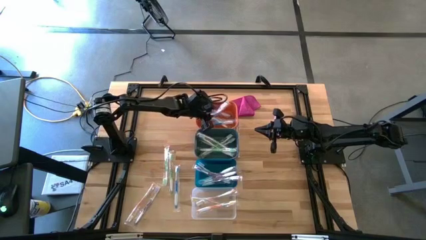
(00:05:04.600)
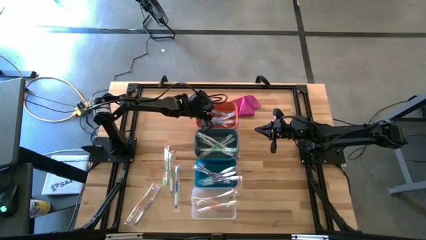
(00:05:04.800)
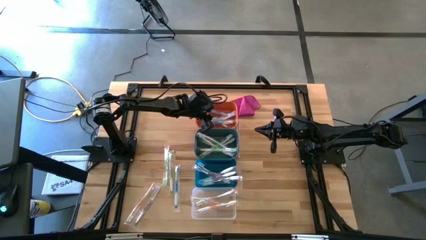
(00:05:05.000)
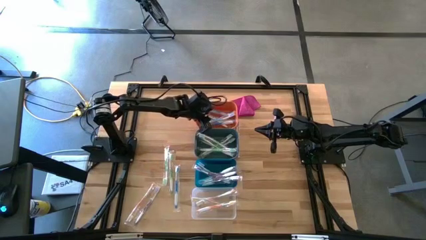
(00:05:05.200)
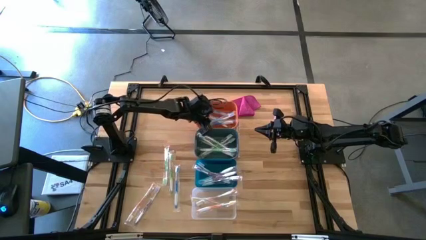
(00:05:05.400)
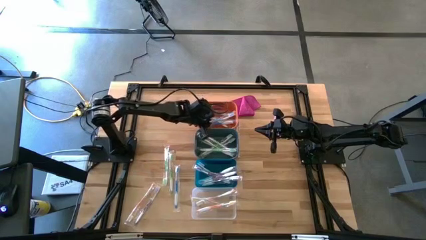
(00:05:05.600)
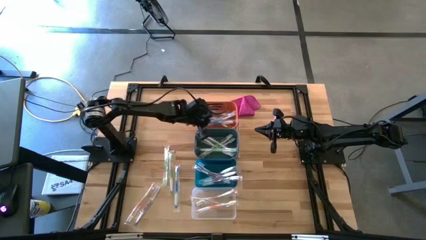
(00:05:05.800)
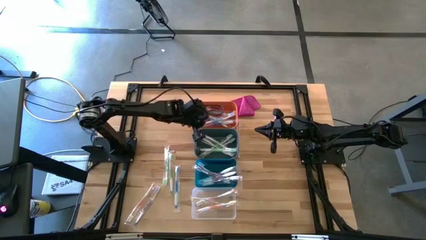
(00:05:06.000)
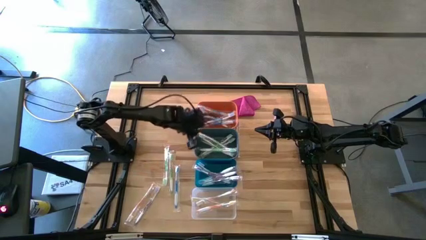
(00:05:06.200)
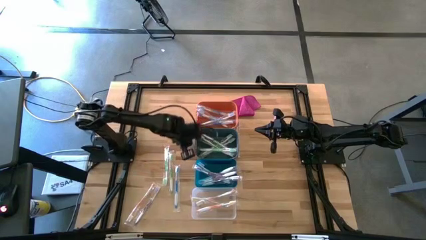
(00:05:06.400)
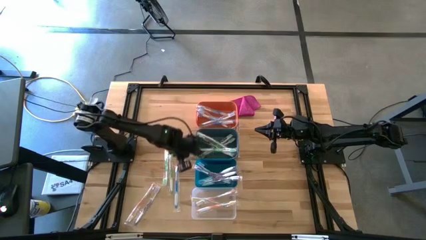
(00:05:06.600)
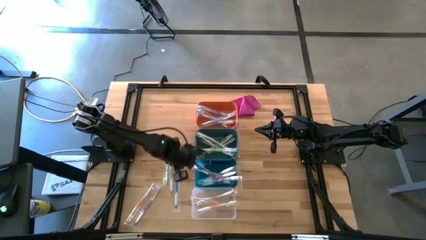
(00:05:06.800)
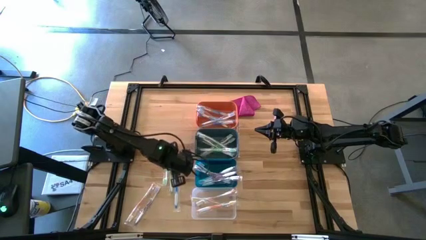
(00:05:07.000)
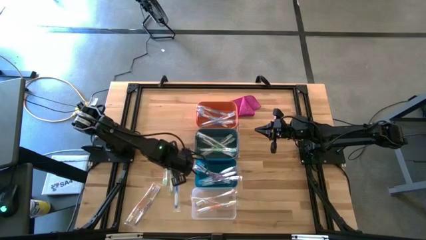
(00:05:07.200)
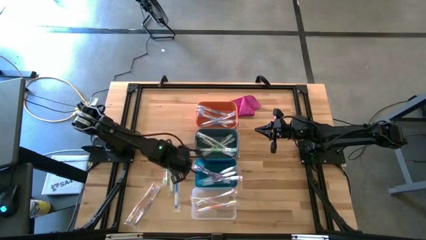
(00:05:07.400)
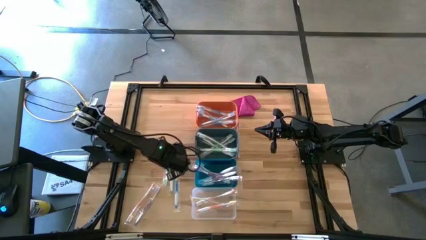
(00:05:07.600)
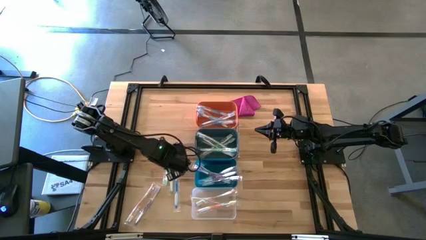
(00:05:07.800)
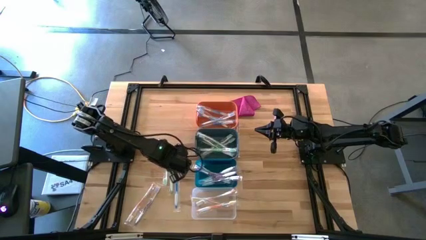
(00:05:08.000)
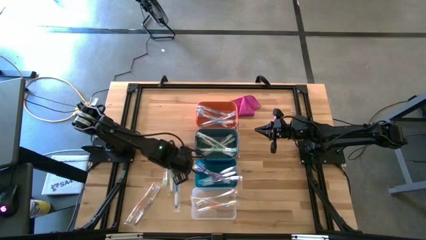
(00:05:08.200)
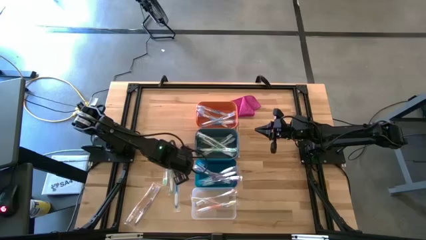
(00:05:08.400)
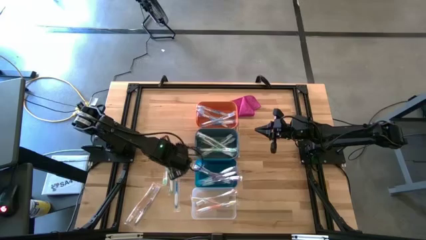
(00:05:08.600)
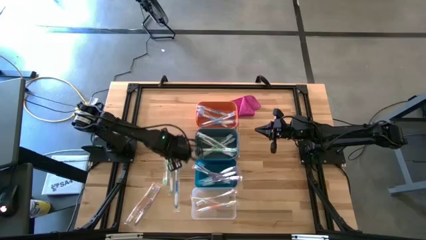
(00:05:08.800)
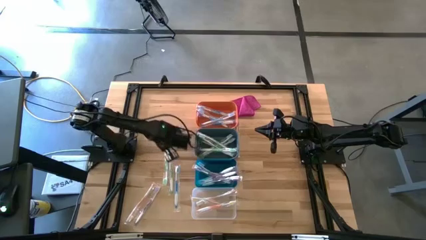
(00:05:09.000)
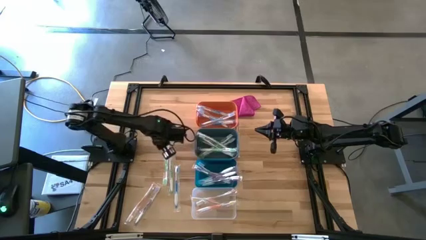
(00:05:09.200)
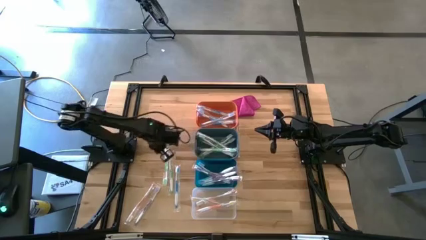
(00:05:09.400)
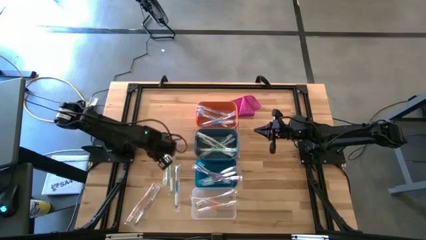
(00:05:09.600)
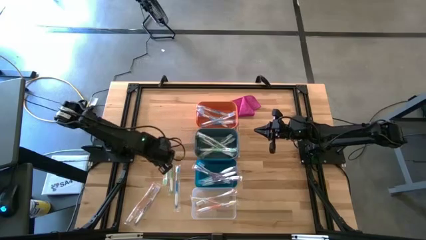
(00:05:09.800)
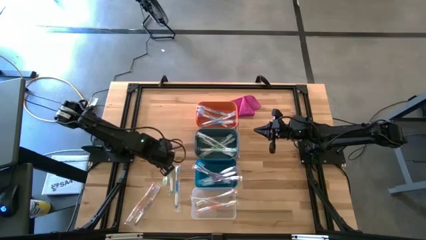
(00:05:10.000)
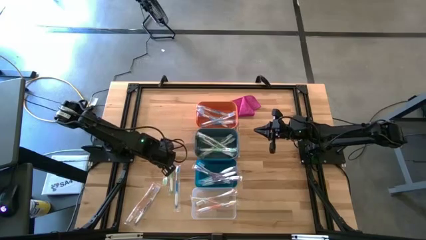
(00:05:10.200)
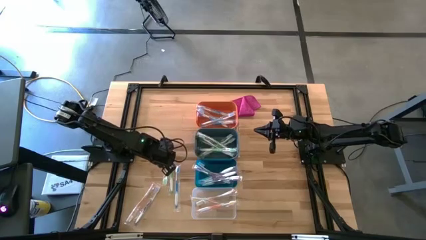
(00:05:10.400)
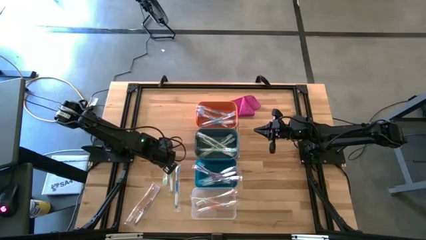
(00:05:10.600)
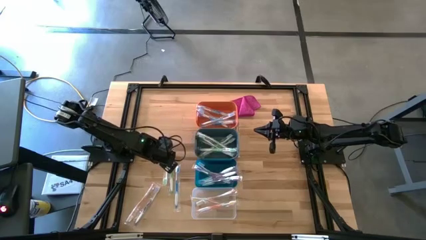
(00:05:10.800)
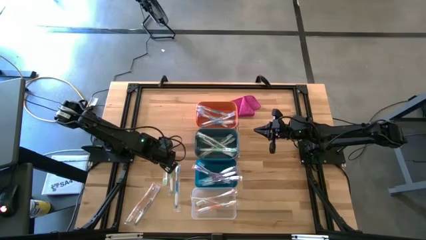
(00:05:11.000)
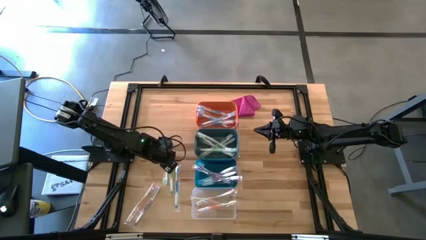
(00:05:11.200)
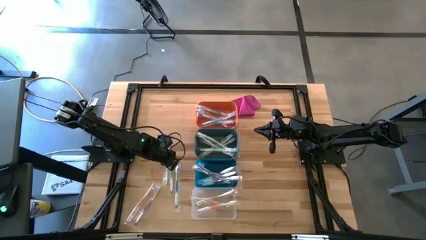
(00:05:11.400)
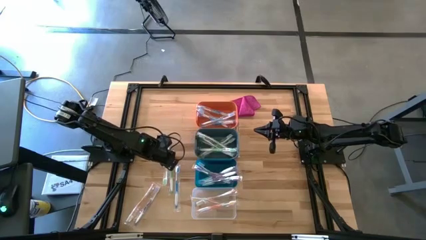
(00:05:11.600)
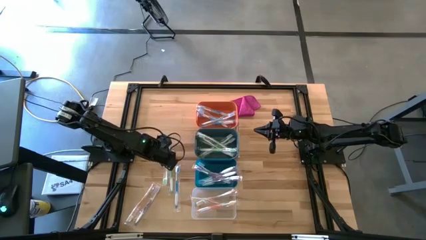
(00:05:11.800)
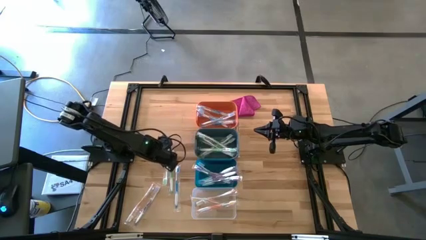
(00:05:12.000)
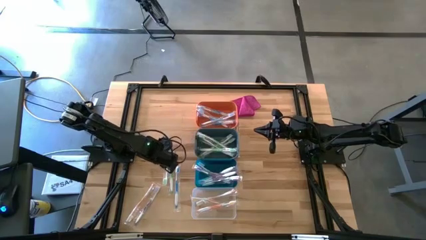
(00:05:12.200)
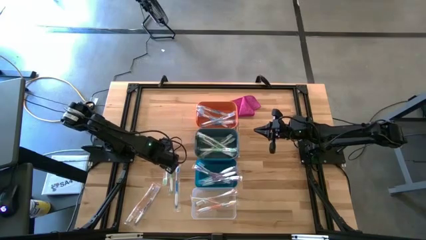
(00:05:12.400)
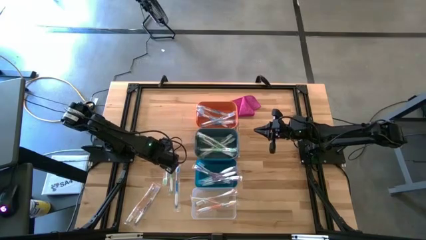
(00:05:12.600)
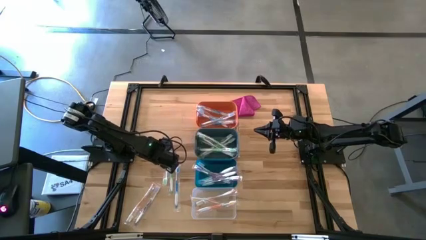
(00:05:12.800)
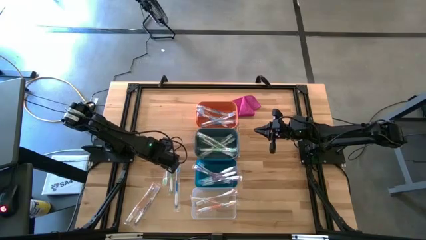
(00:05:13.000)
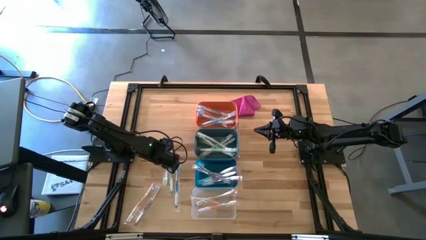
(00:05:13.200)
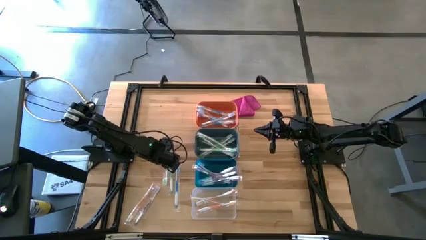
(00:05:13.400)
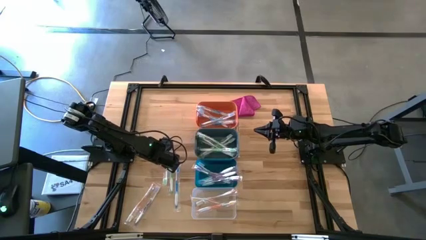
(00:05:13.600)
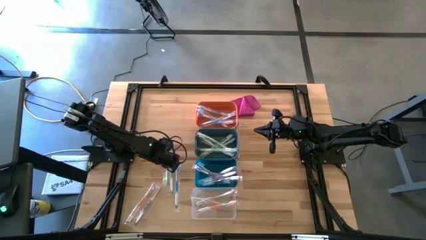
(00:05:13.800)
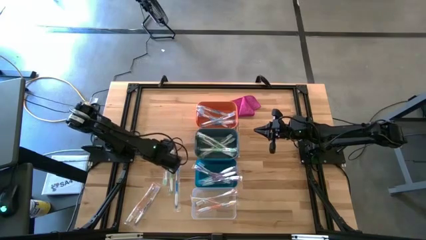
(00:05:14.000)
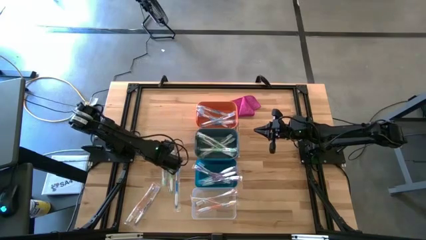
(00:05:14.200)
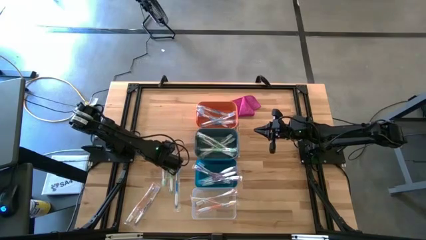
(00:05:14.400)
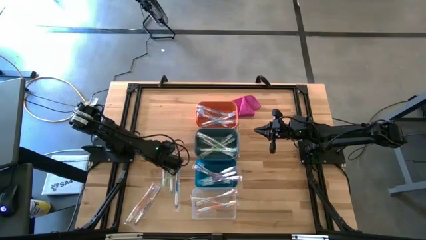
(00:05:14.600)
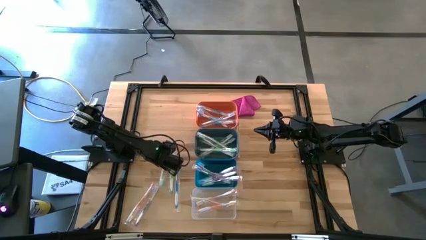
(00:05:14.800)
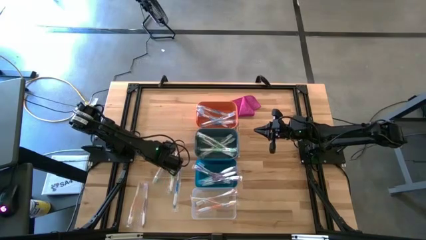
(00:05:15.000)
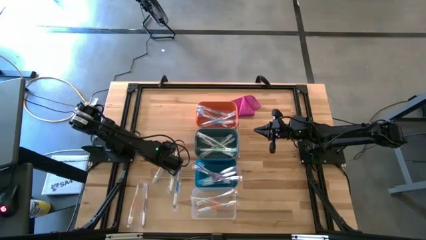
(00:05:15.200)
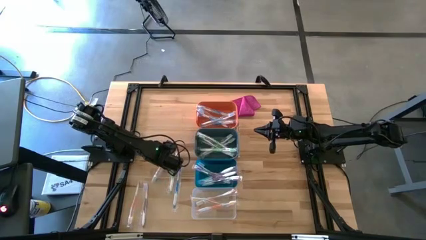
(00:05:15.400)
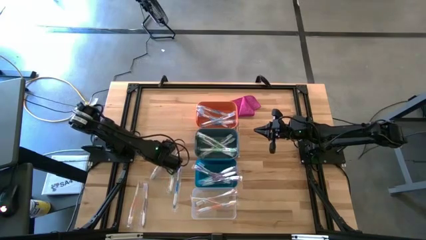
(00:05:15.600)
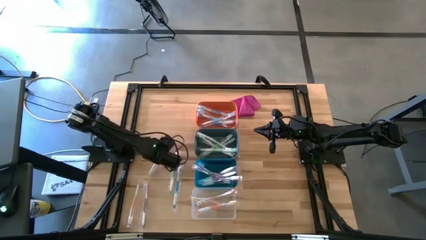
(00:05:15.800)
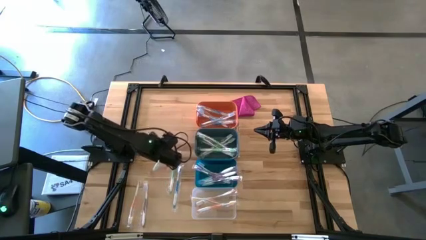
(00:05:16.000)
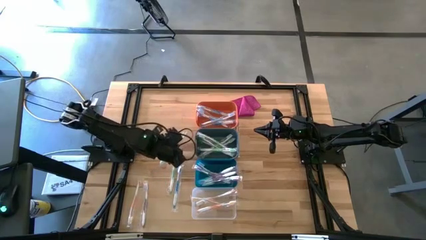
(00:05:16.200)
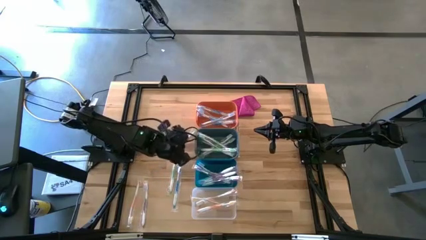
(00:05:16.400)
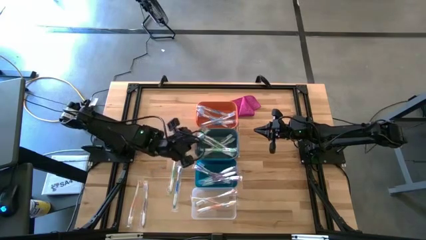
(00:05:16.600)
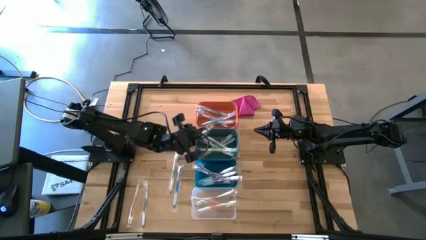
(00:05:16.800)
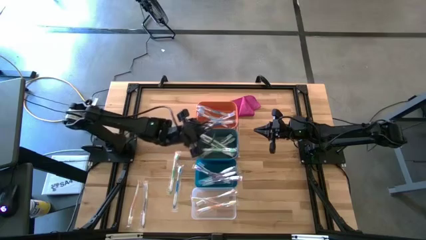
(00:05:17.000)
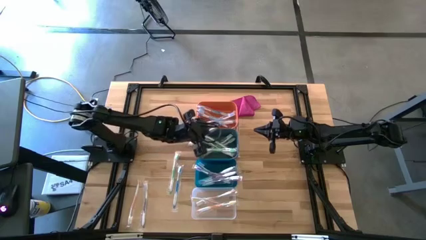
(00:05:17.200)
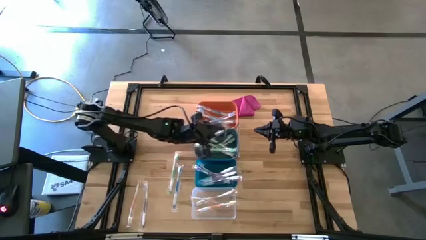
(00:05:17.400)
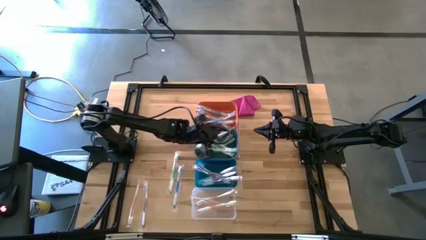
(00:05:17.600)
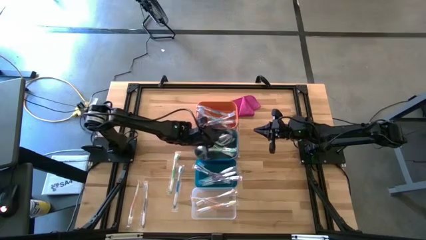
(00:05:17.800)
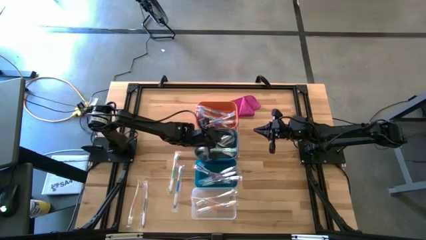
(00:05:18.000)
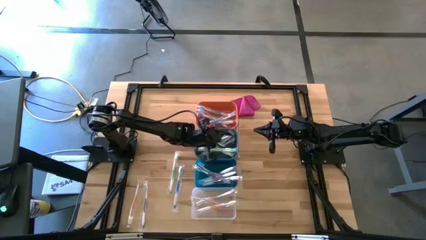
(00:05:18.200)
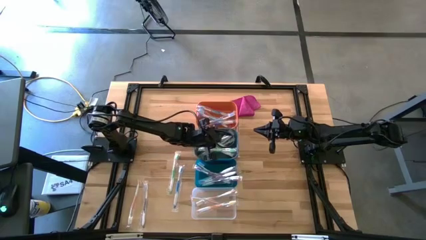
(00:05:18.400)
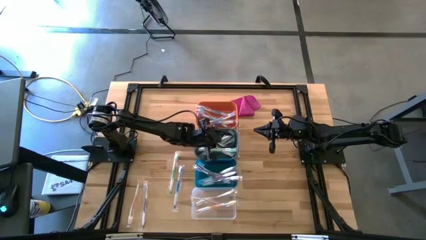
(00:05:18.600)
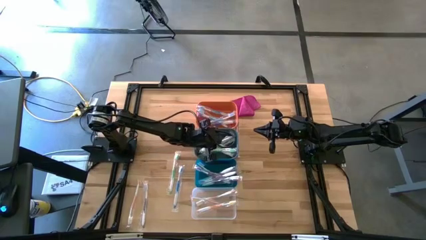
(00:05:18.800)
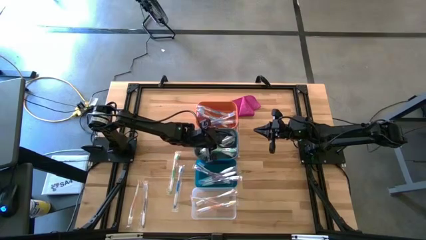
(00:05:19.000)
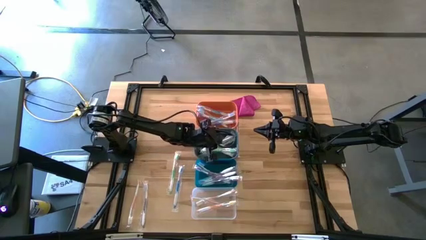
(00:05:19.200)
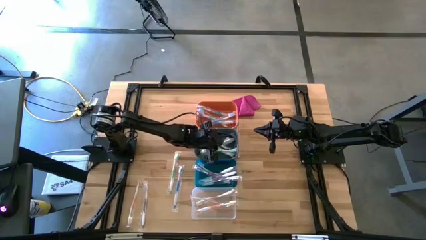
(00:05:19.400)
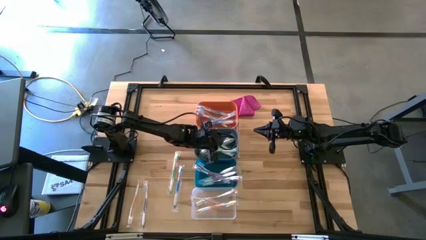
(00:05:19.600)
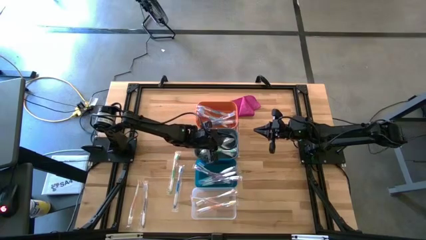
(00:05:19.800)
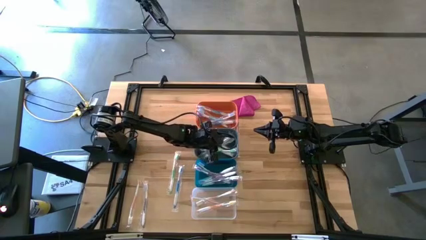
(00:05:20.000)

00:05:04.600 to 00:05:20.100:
Task: Pick & Place Toothbrushes
Put the green toothbrush into the green bin

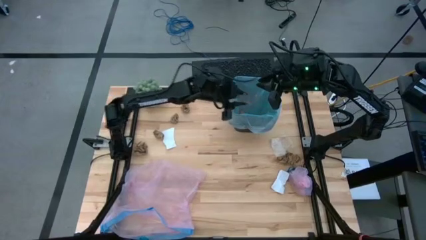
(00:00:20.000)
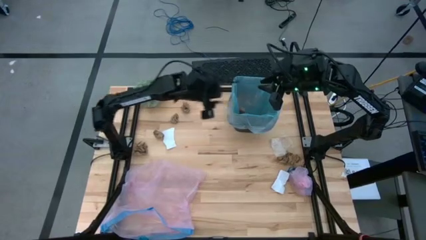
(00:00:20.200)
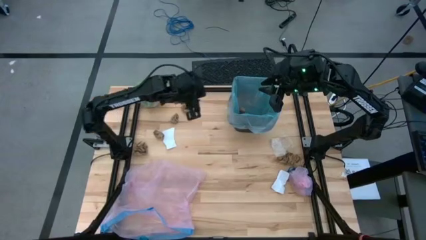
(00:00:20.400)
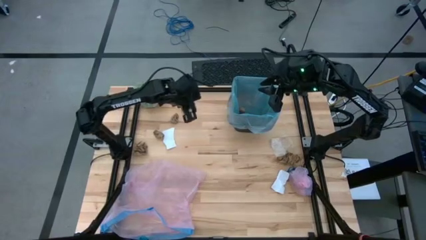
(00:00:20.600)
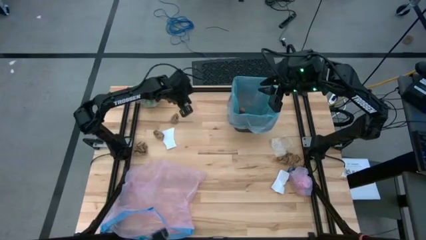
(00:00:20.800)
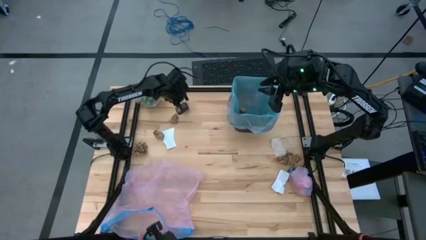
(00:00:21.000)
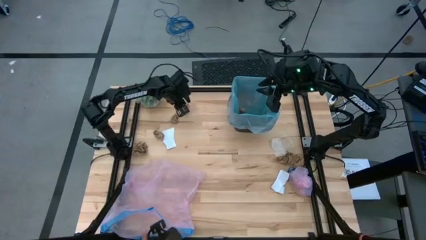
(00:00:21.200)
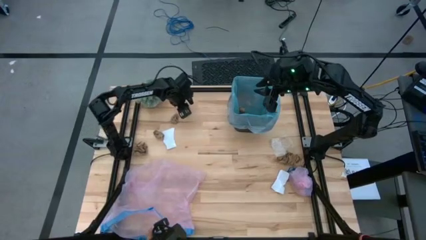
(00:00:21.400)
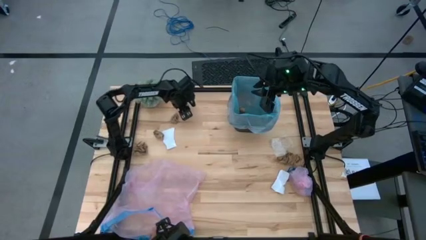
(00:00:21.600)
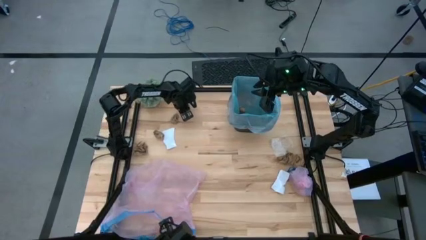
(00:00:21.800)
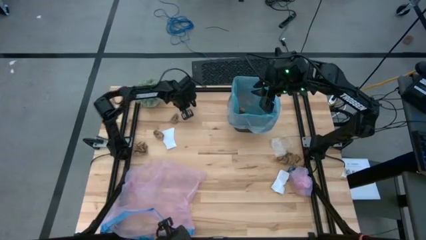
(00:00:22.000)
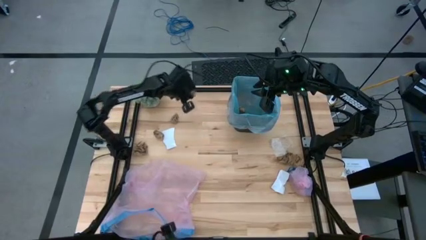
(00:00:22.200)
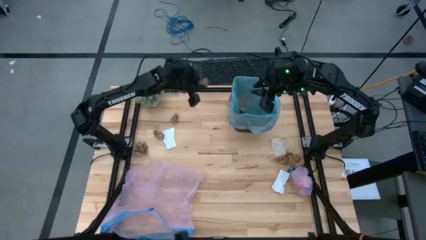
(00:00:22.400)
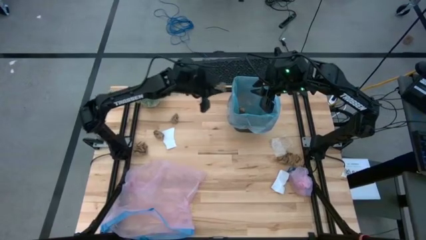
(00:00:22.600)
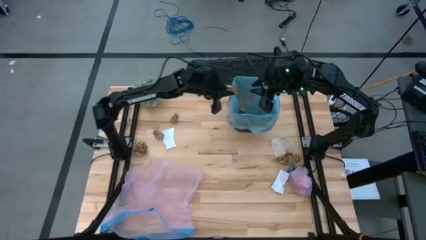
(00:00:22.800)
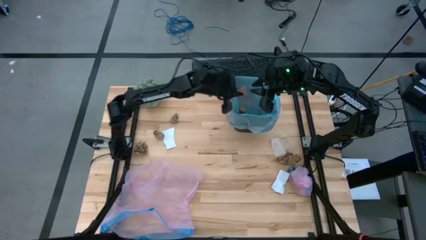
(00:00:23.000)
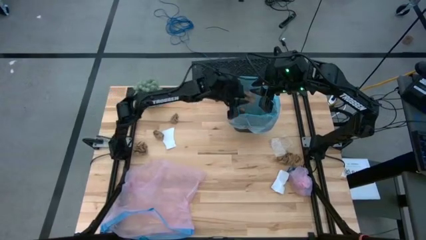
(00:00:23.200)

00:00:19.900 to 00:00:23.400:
Task: place trash/remove bag and relplace
Put the brown napkin into the trash bin
